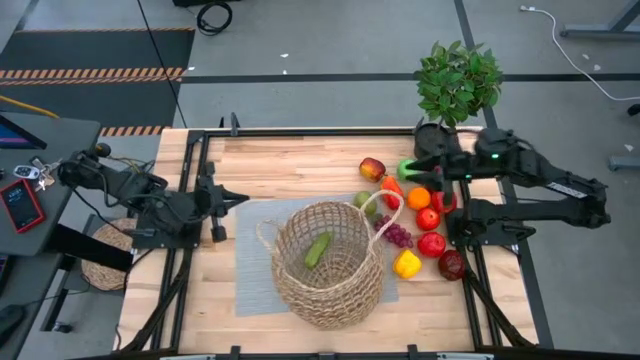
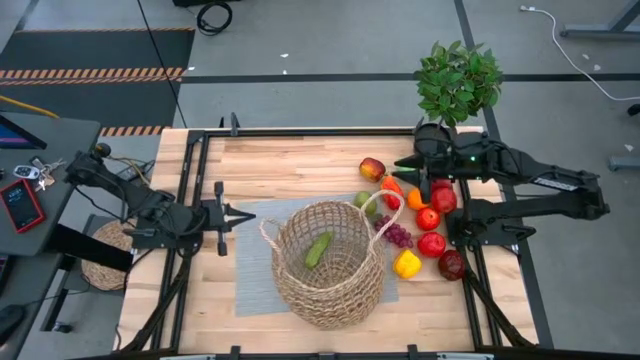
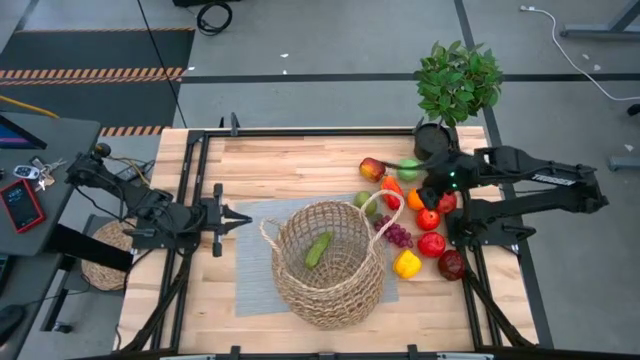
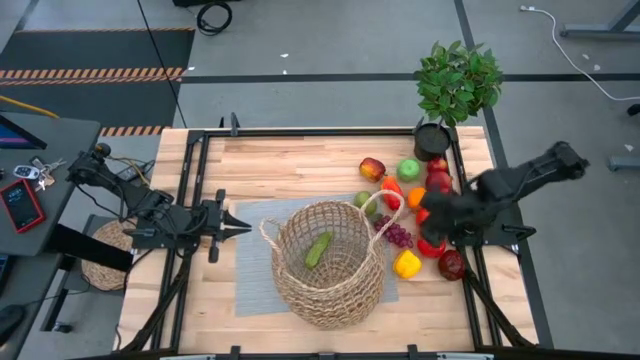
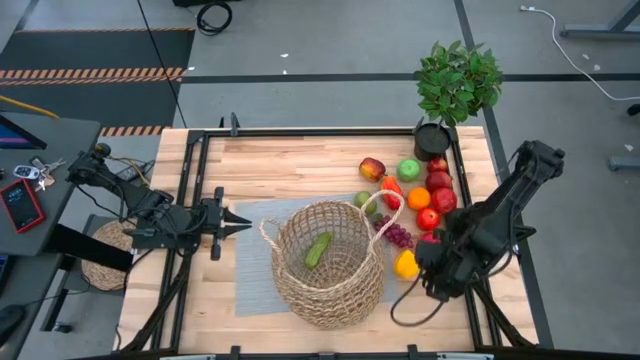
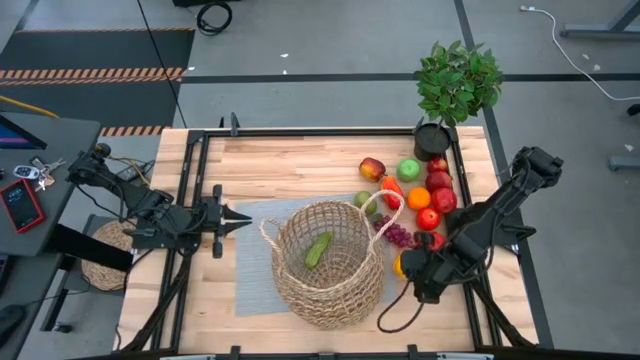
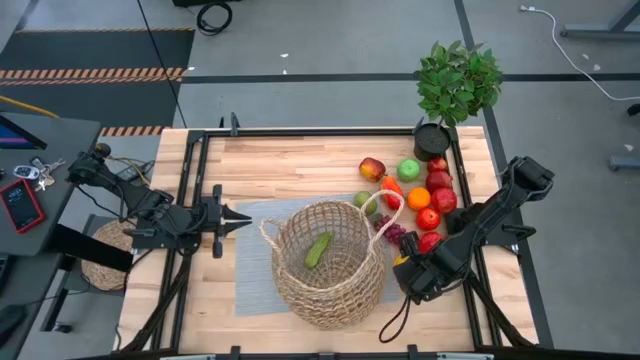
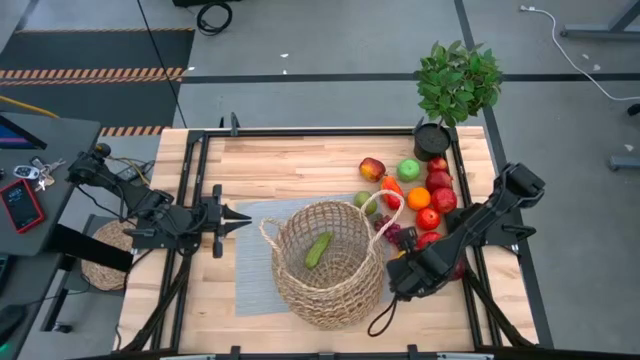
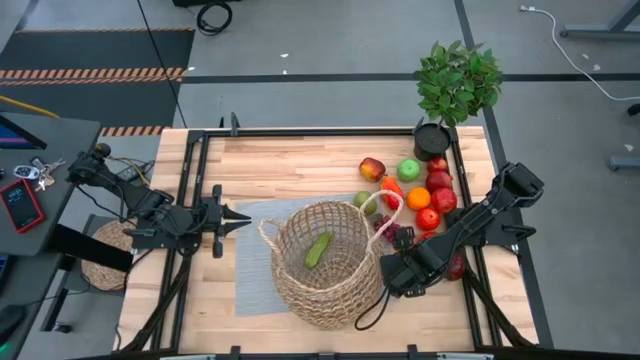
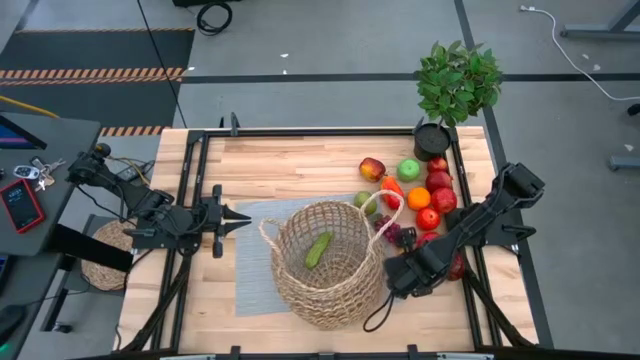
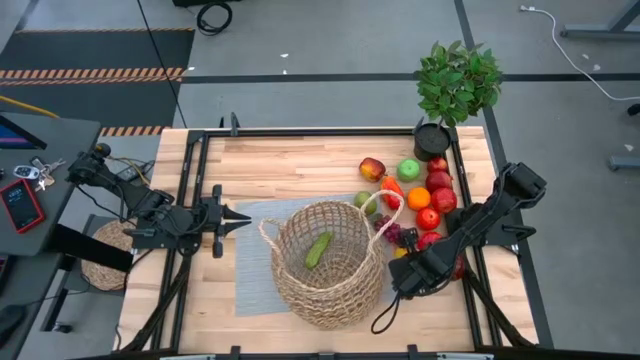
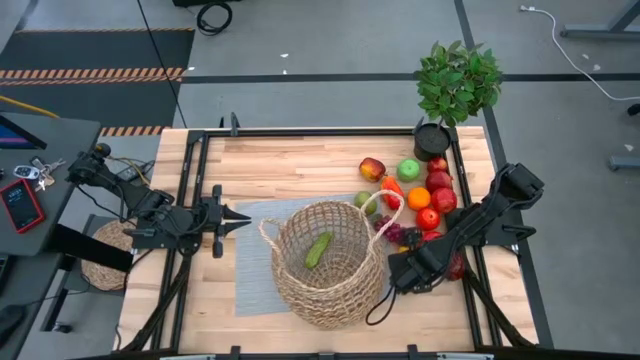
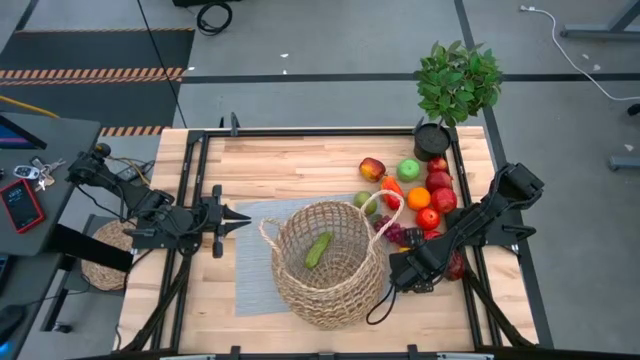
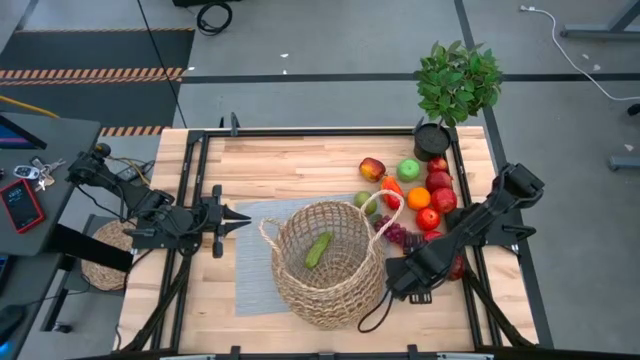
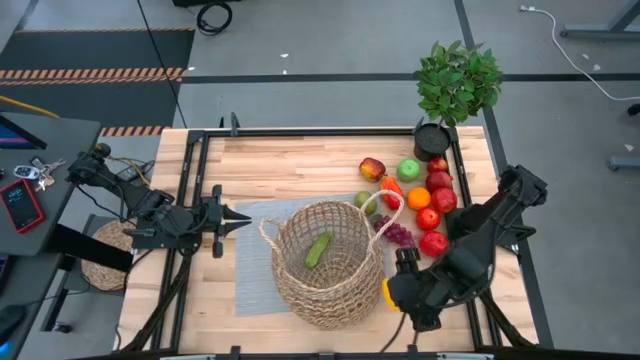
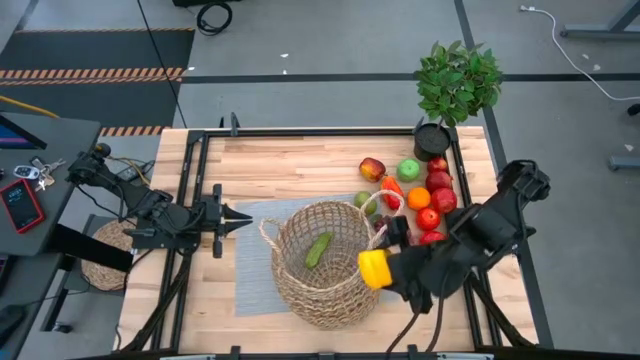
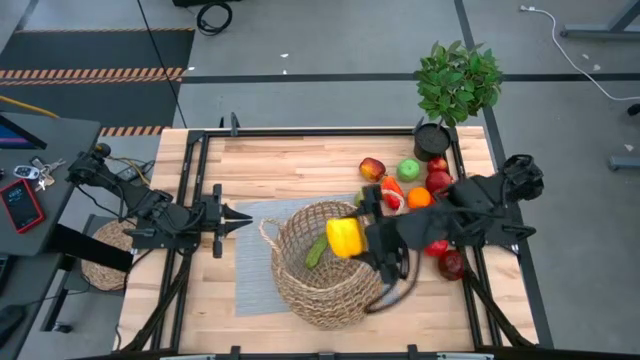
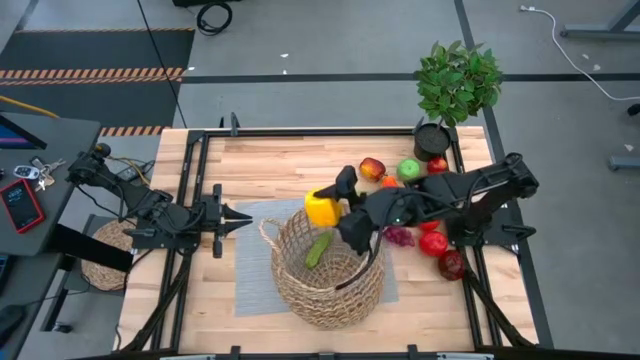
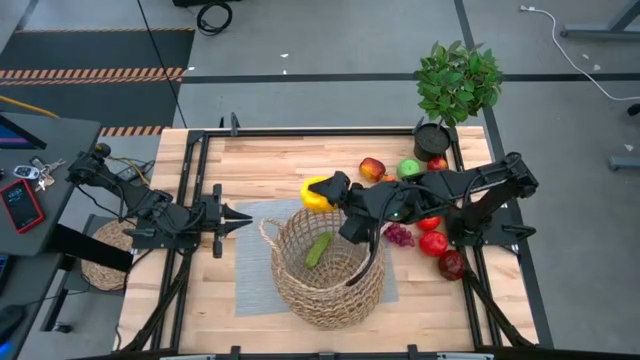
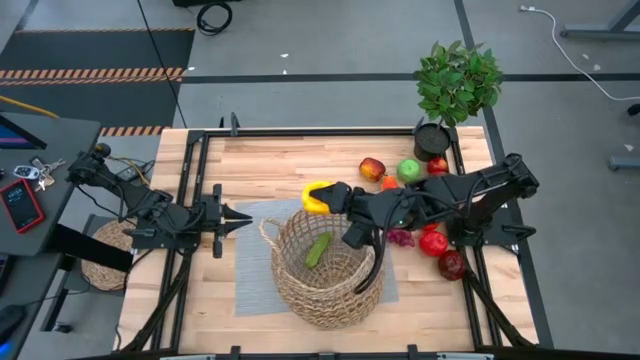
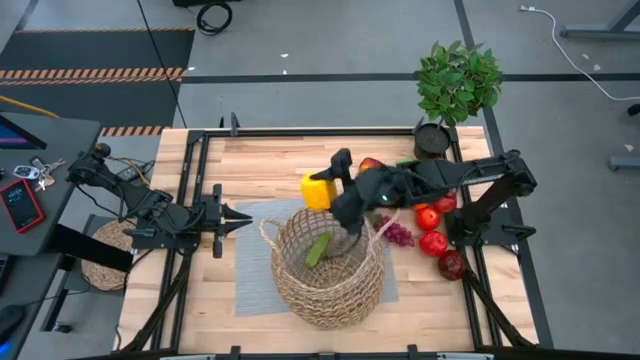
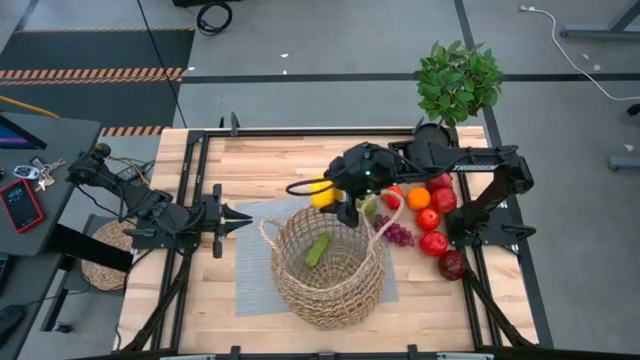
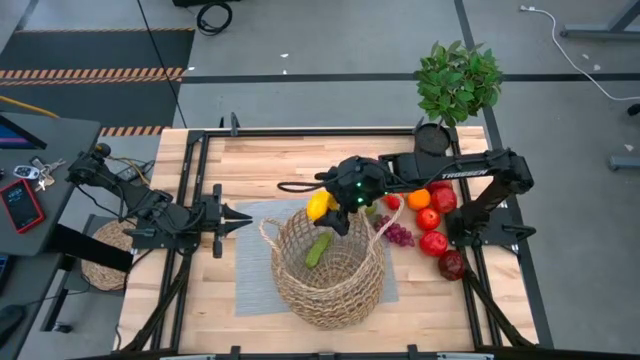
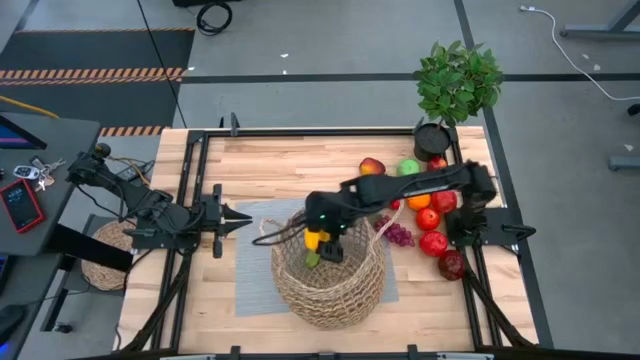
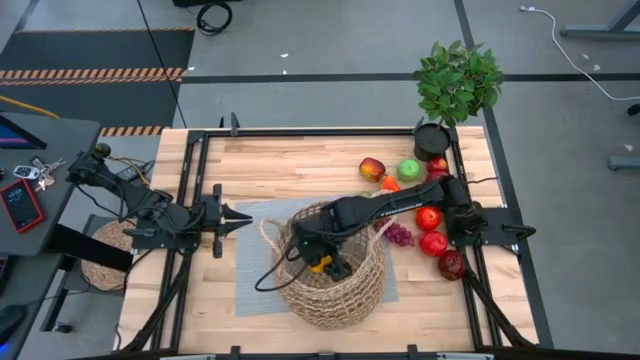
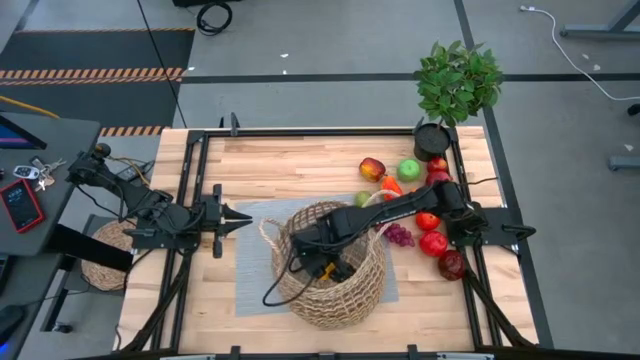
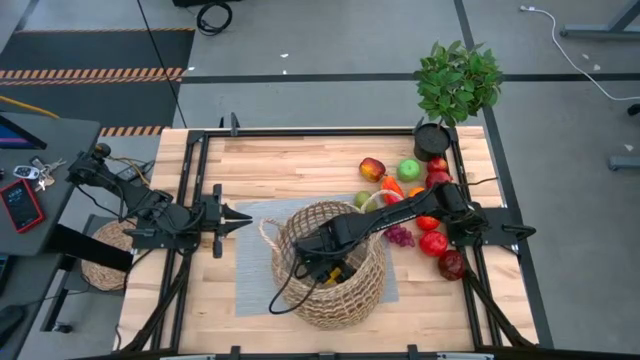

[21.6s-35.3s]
Task: Build produce basket
Put the bell pepper into the basket
